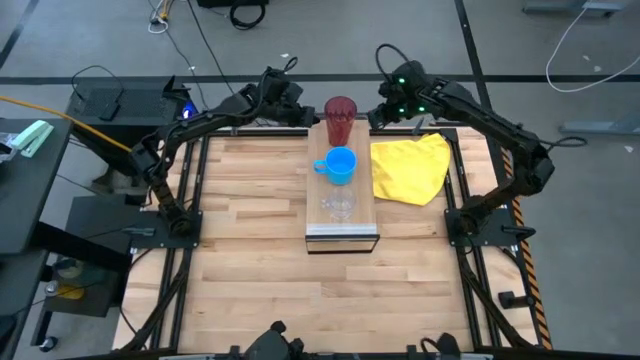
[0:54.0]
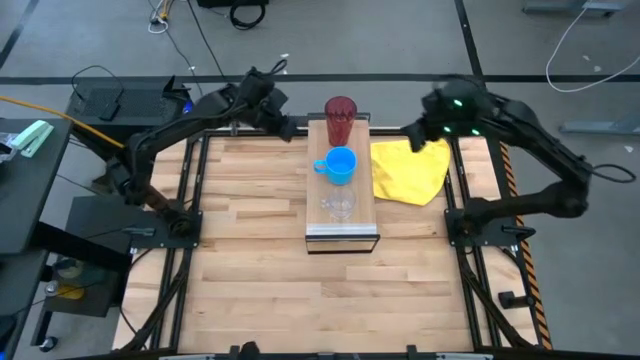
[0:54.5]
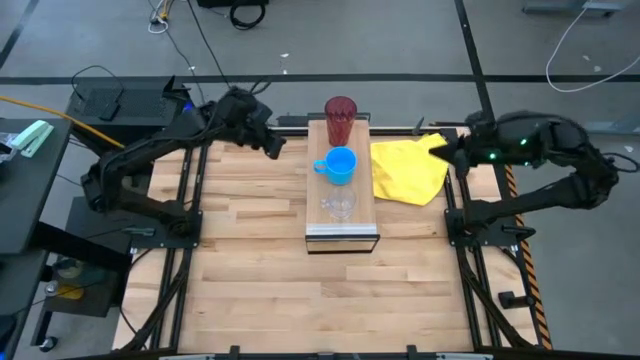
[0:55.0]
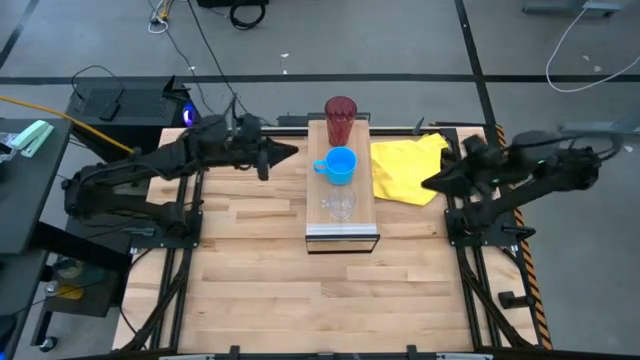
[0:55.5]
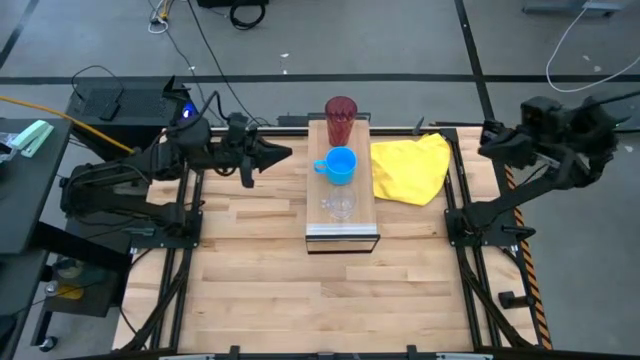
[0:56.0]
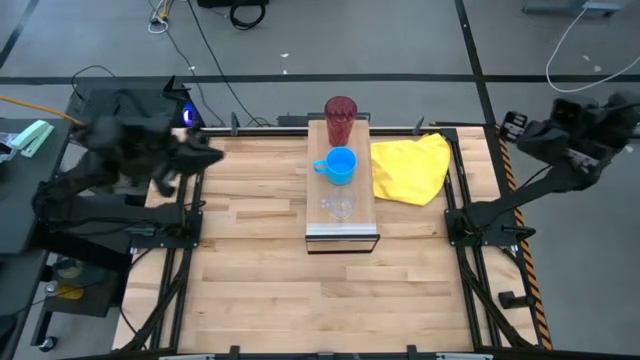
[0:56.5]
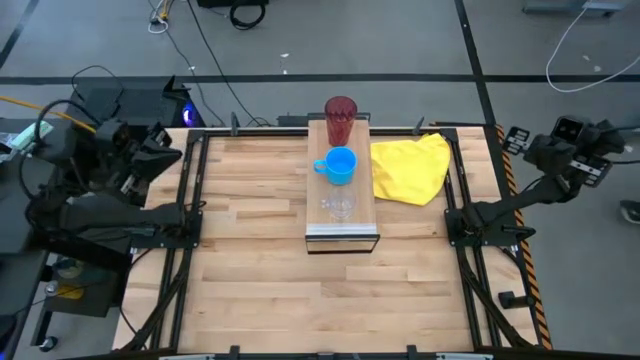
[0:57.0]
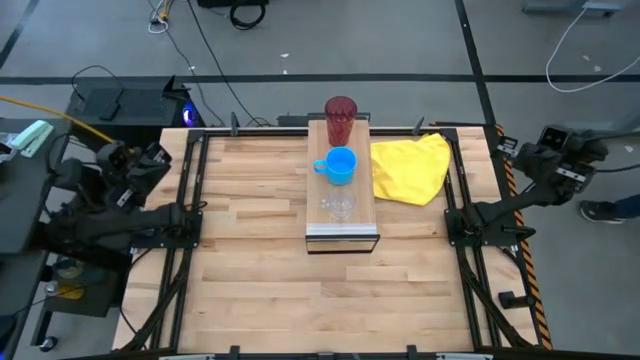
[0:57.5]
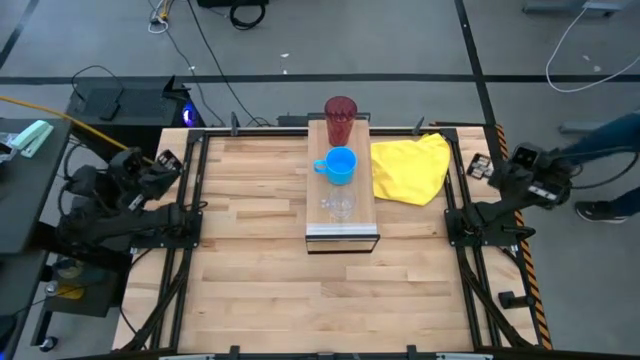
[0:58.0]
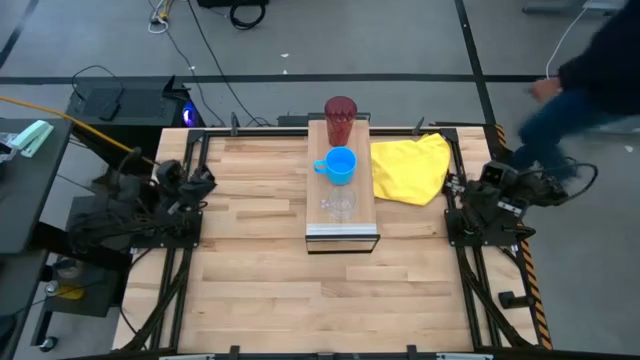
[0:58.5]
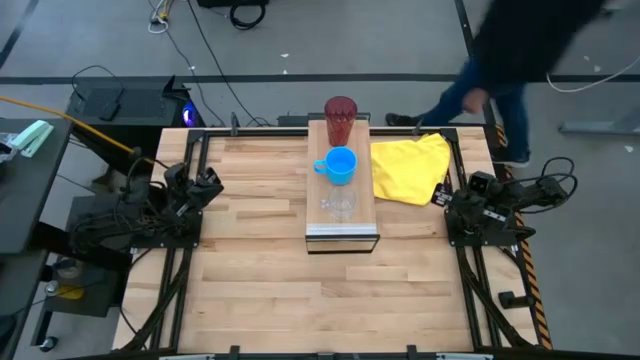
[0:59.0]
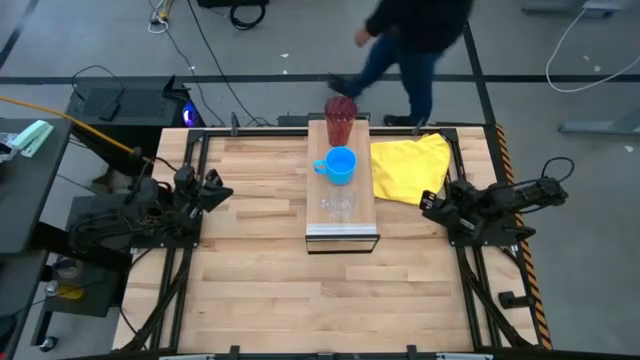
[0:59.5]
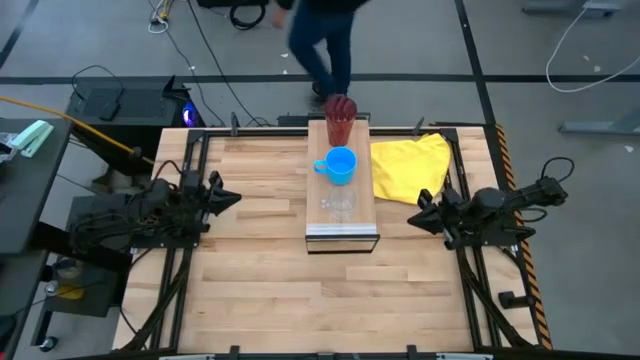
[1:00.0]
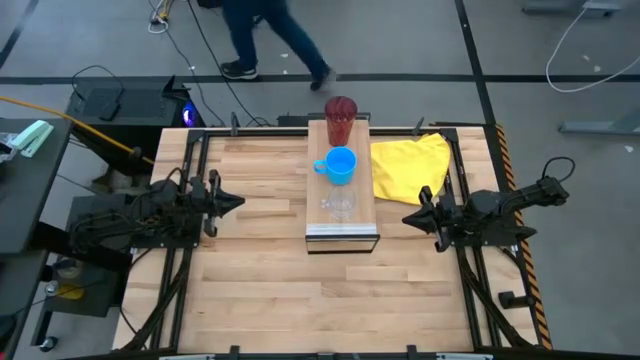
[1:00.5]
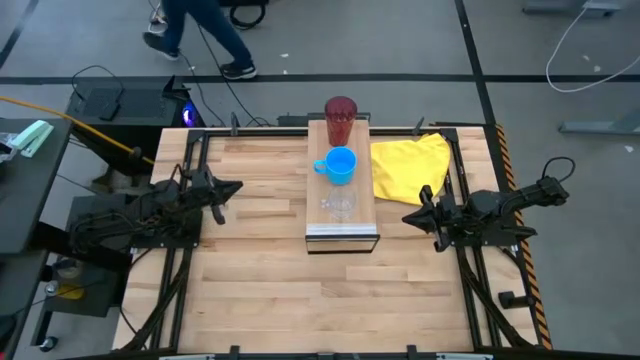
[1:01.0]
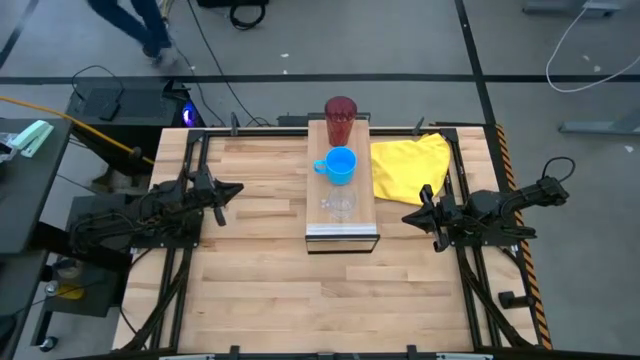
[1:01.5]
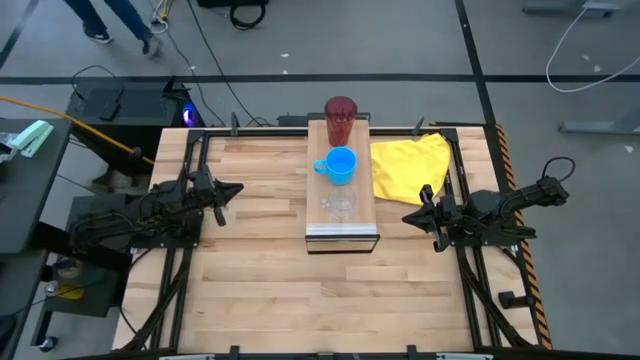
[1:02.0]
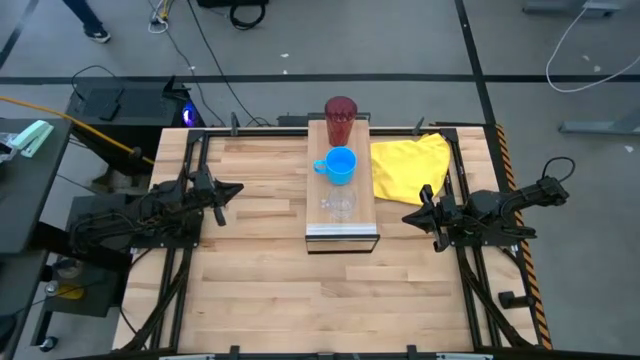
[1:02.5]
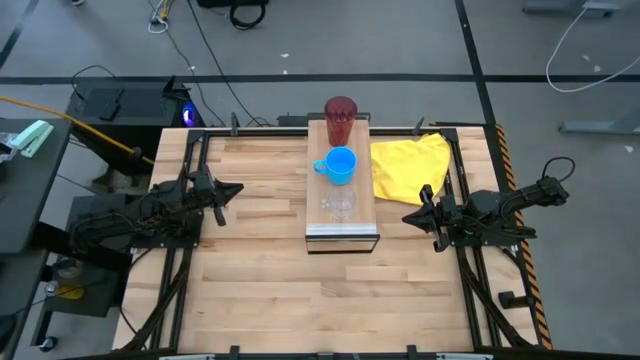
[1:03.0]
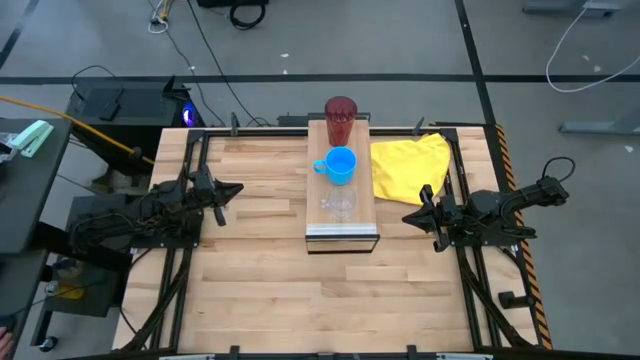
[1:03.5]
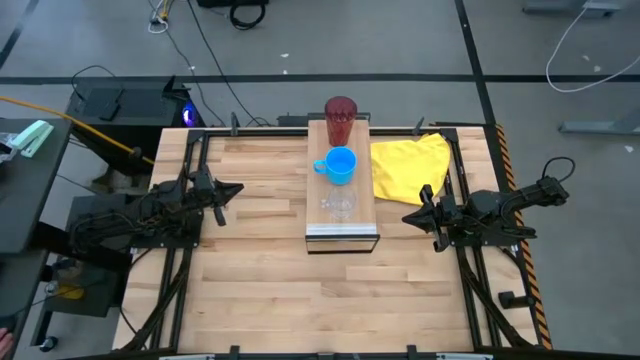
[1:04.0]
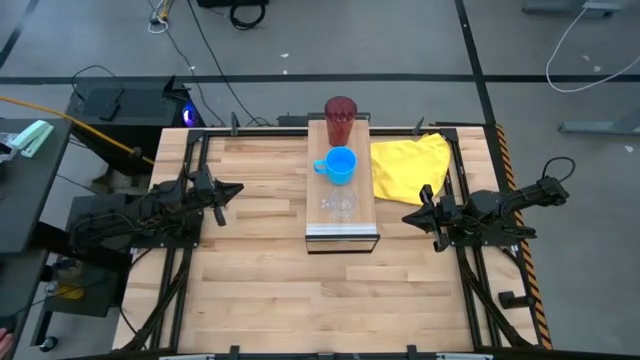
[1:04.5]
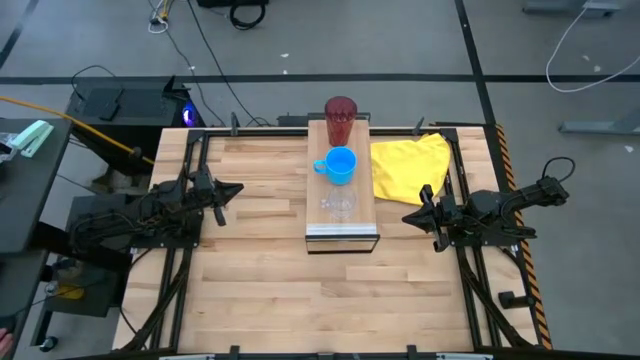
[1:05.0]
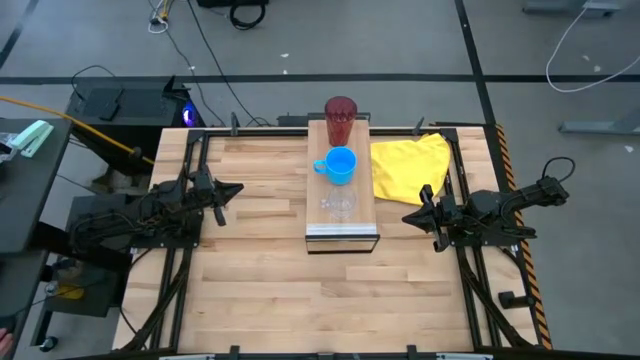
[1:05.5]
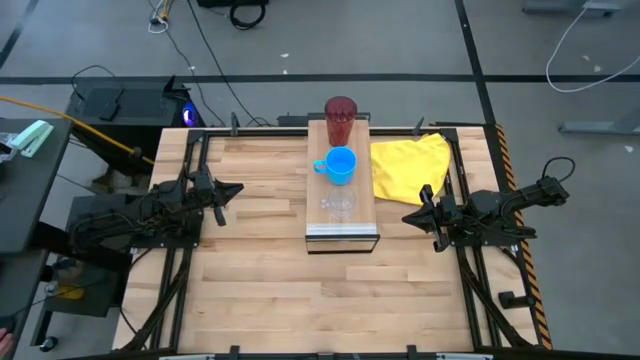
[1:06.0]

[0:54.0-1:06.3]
Task: Stack small to large cups/mugs on shelf
Return to Home Position

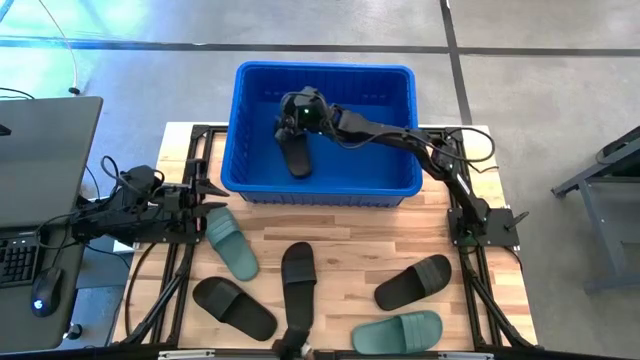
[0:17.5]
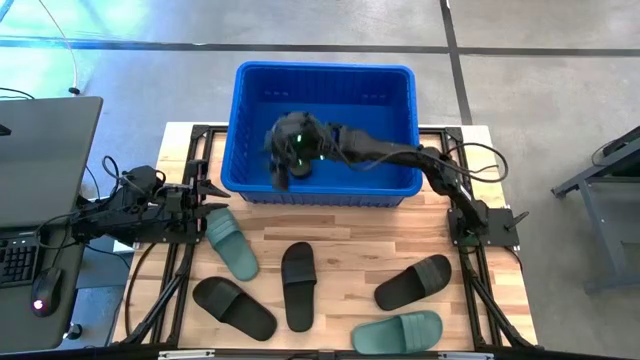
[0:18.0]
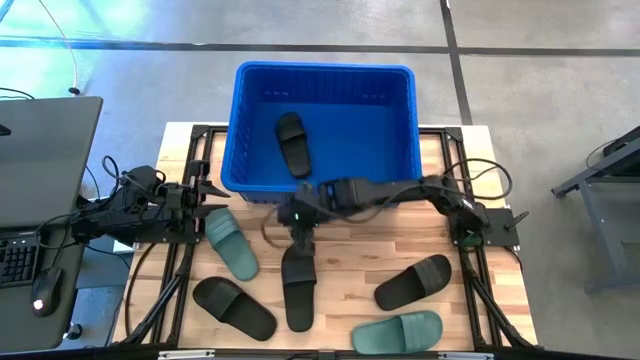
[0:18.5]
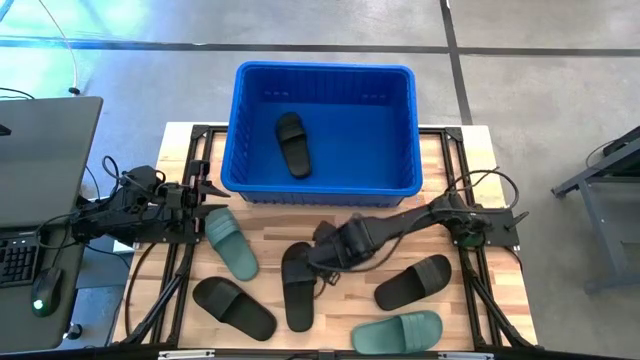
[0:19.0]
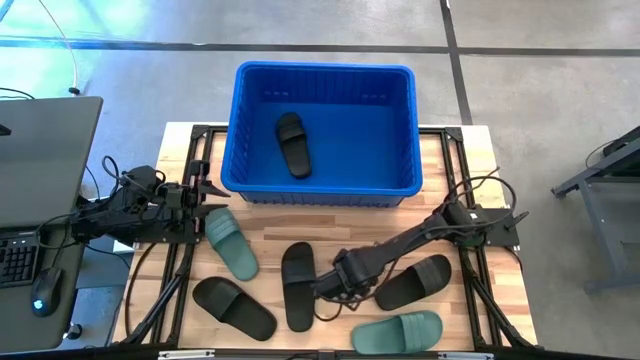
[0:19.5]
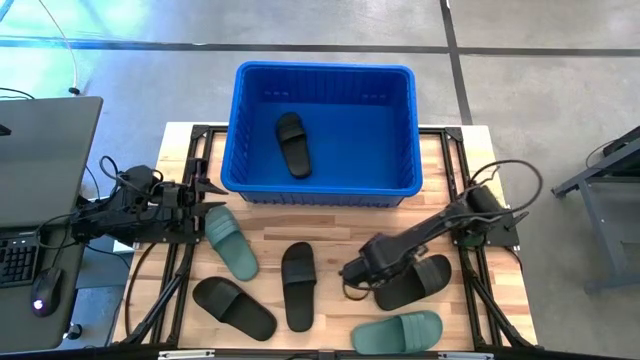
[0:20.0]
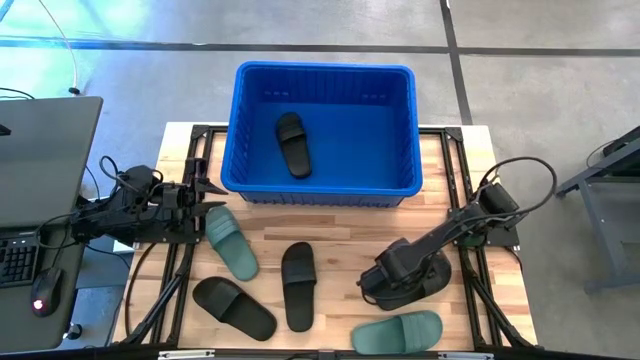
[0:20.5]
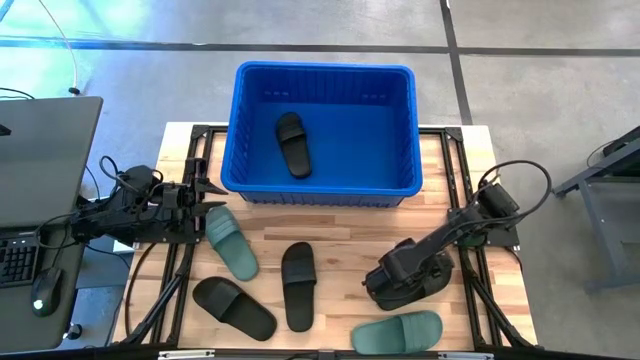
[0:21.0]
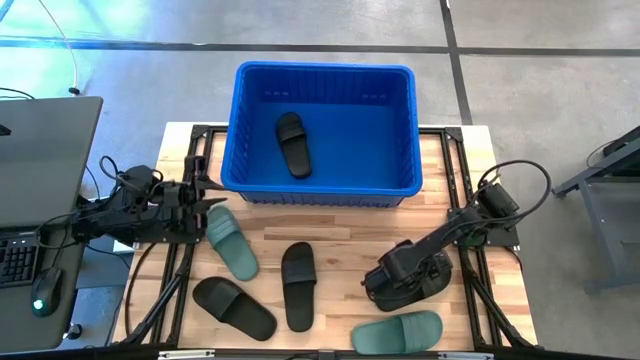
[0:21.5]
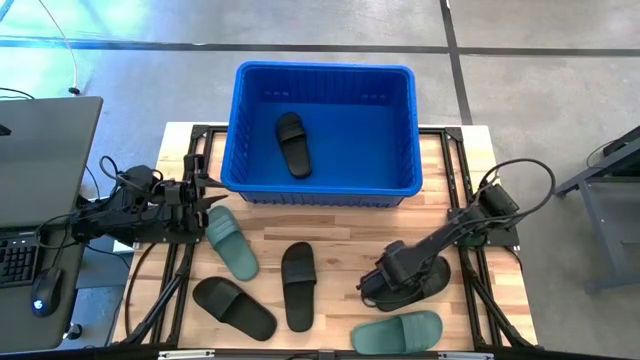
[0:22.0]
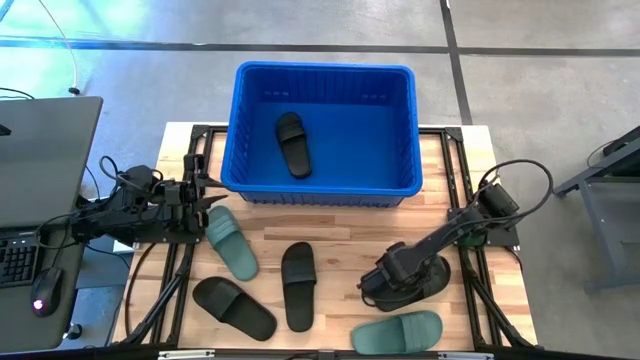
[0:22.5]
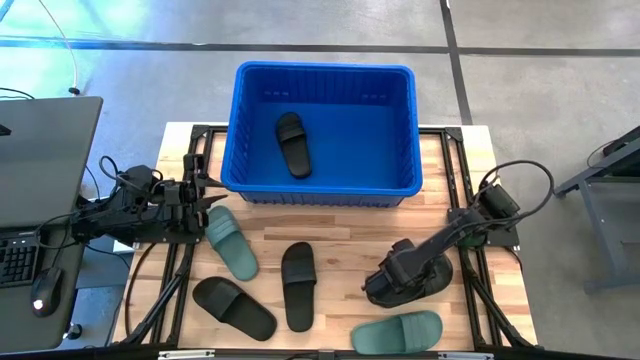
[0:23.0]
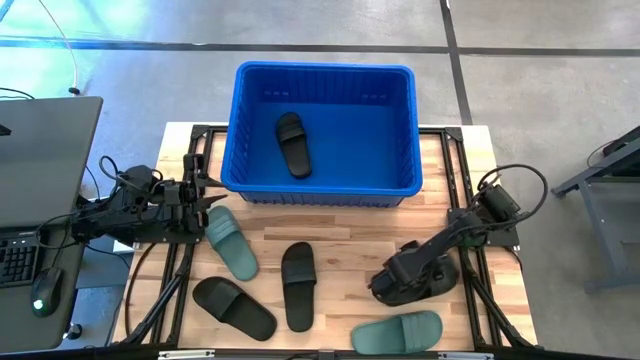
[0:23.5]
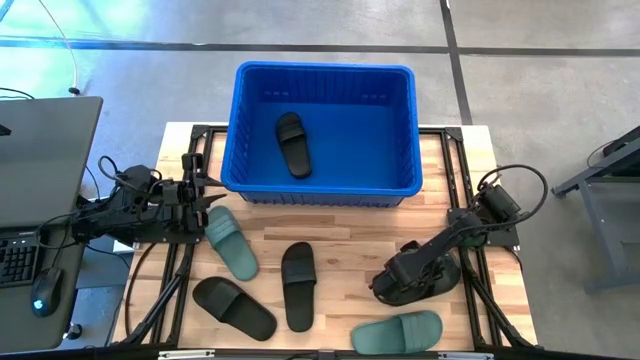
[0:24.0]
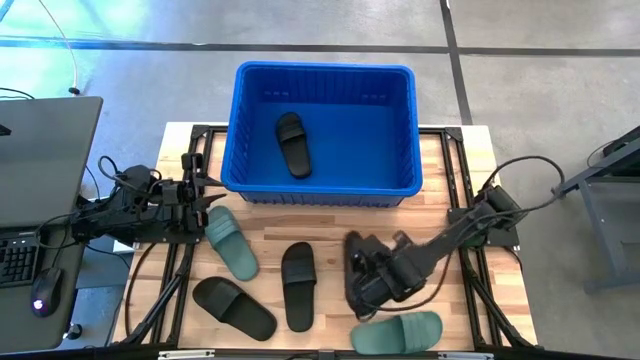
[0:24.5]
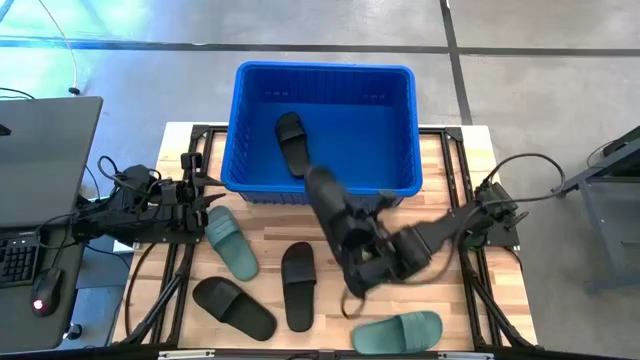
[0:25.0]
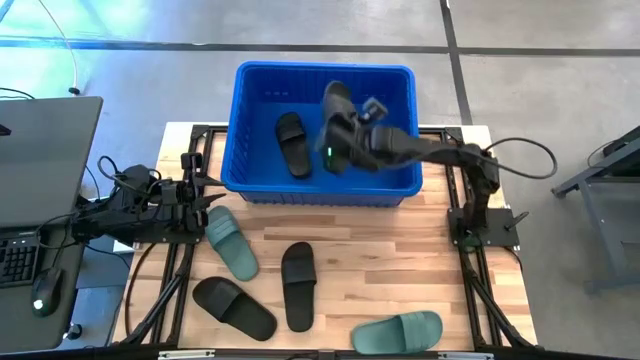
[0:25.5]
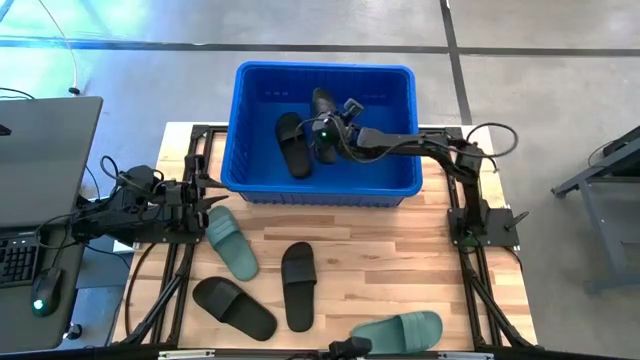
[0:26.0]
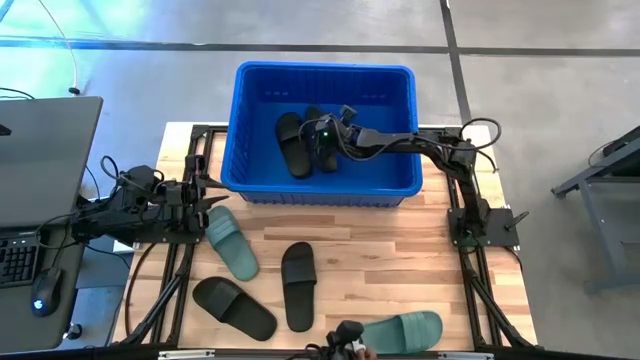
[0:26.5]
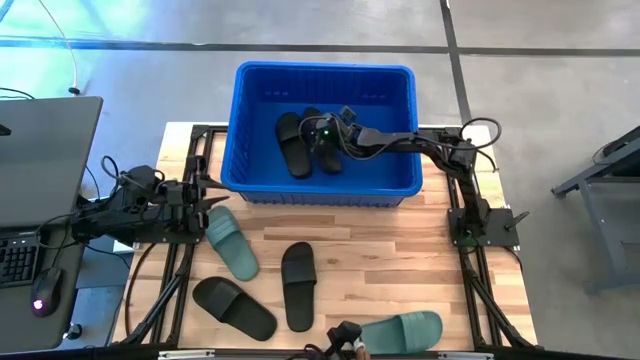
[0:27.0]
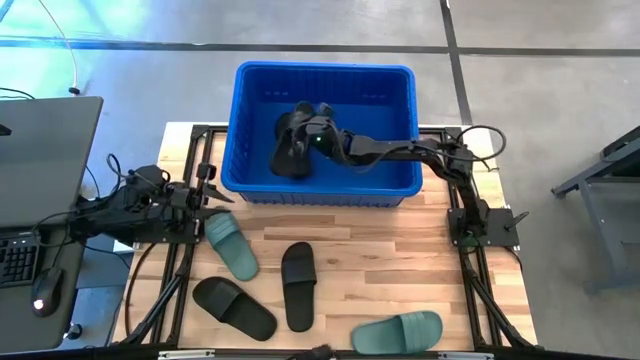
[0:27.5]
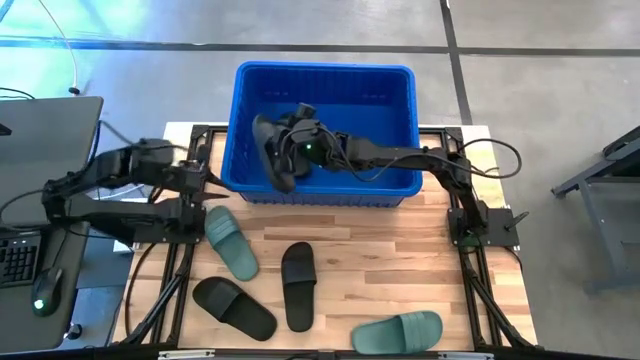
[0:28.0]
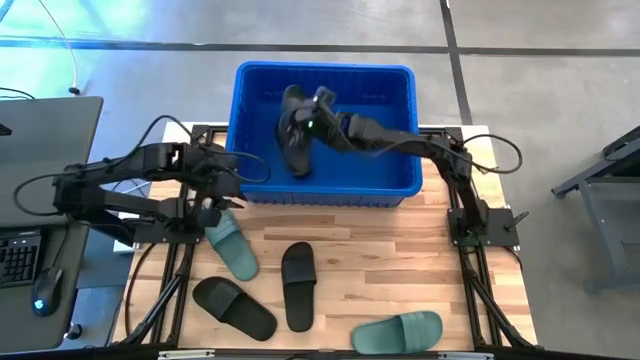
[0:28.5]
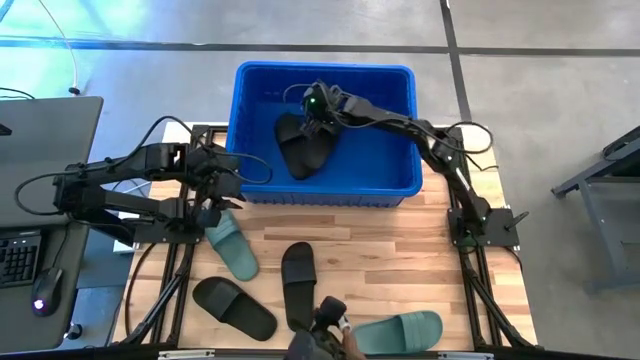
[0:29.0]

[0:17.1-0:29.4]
Task: Pick and place slides into bin
Put the black slide into the blue bin
